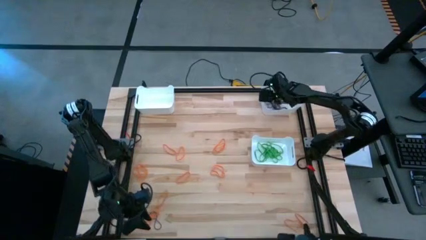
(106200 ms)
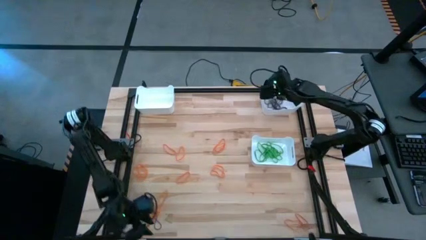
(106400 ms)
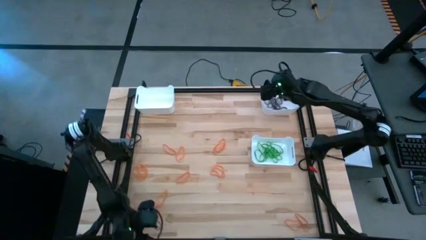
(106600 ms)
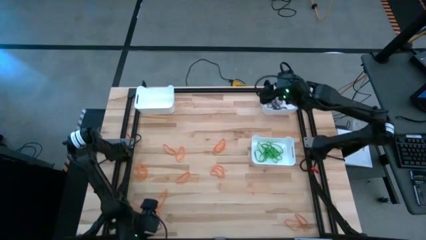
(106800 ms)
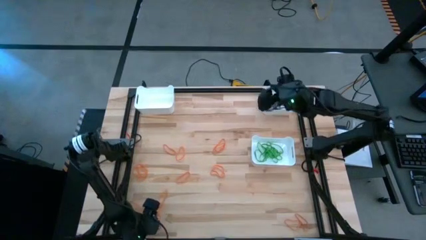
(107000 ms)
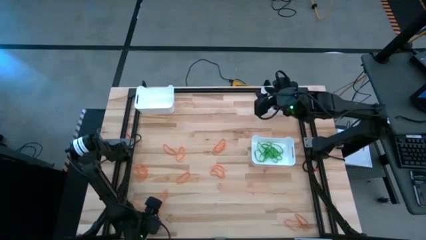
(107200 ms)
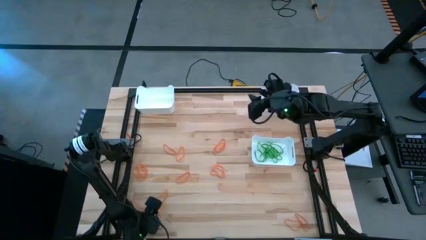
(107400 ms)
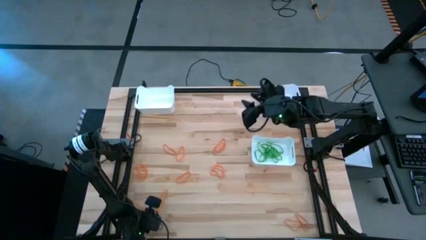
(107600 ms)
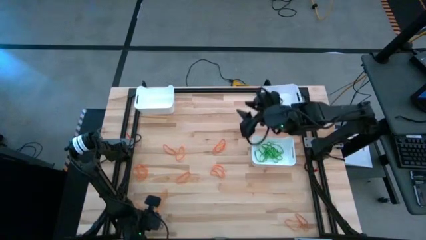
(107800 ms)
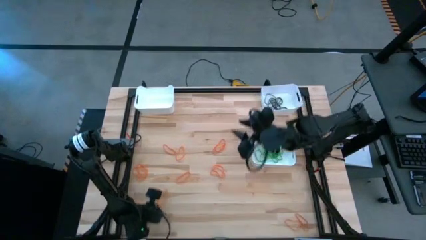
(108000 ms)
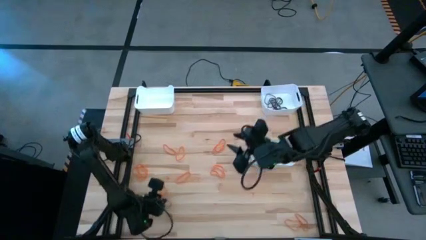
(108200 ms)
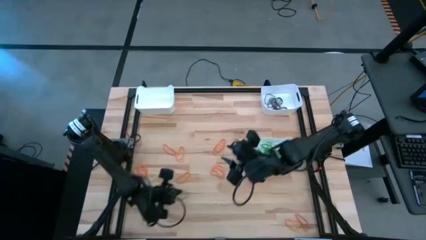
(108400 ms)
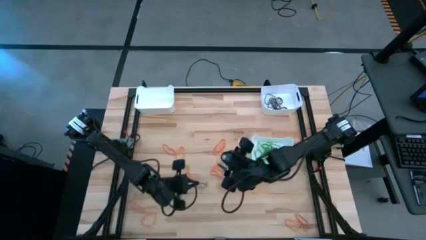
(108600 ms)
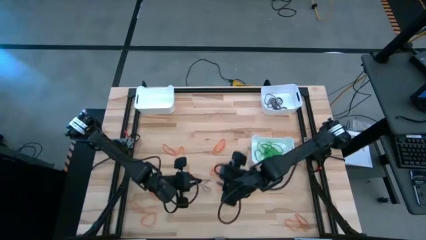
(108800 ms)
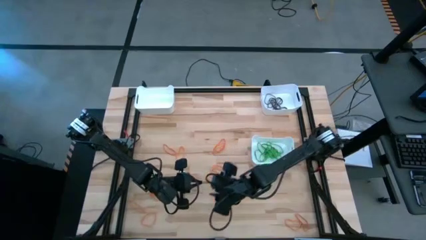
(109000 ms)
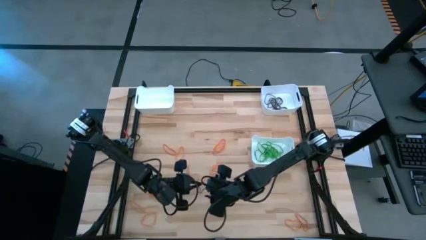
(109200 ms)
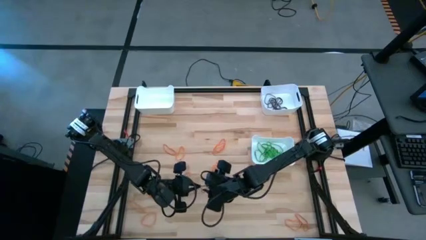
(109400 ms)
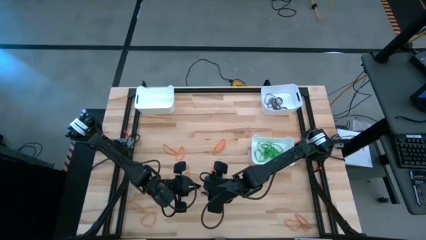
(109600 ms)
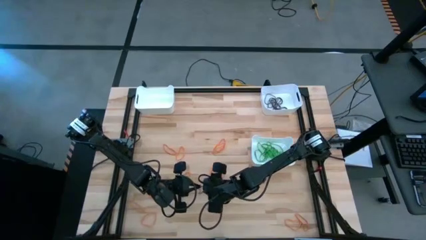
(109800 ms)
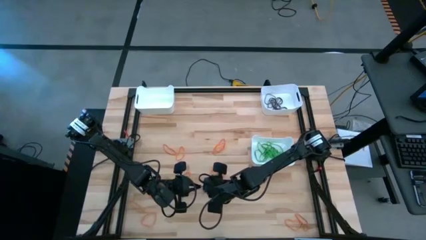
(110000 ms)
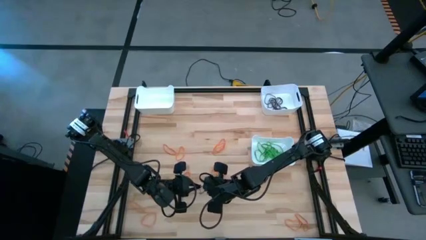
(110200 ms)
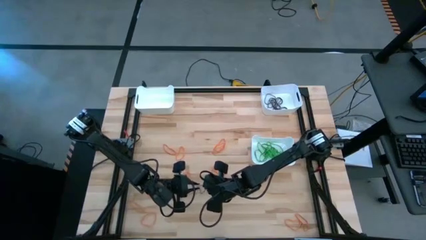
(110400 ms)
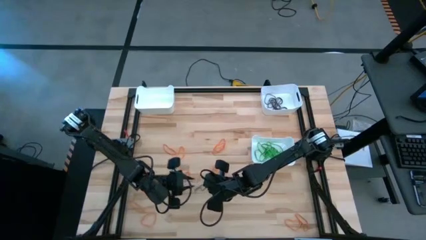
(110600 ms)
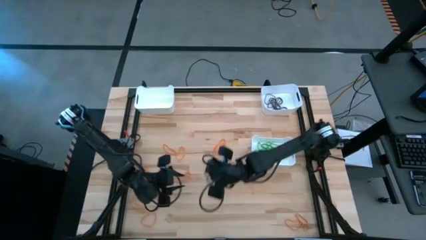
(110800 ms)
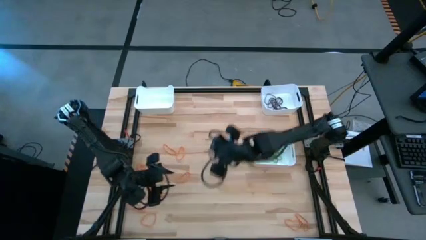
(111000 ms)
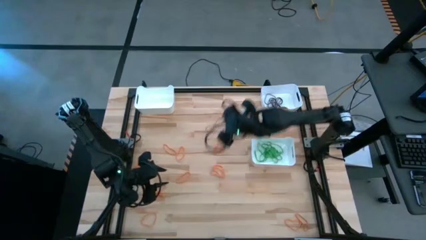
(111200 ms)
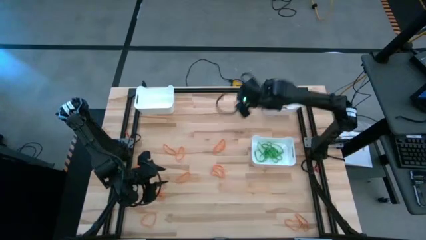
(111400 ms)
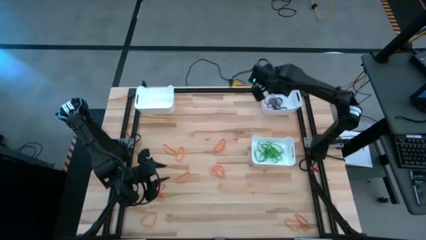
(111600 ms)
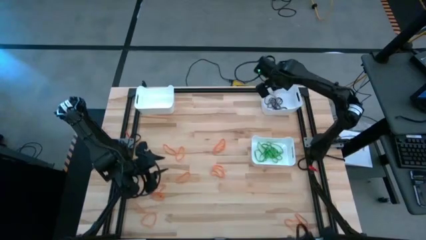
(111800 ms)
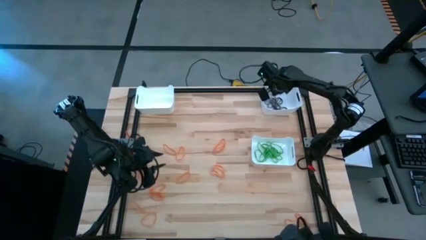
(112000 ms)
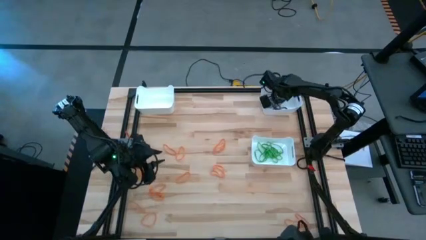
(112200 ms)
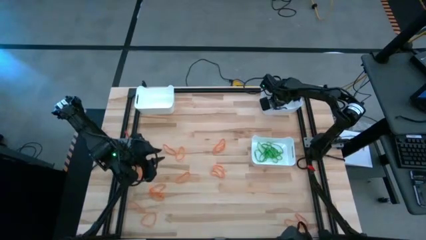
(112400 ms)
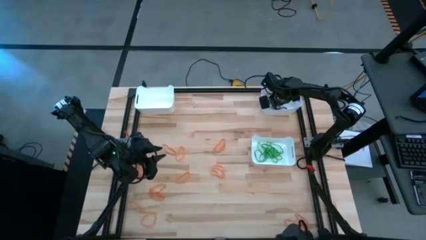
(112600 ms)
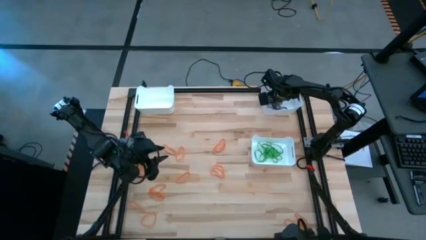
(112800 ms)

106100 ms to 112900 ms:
Task: Sort rubber bands into baskets
Put the black rubber band into the top right white bin

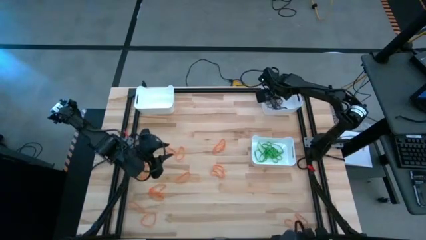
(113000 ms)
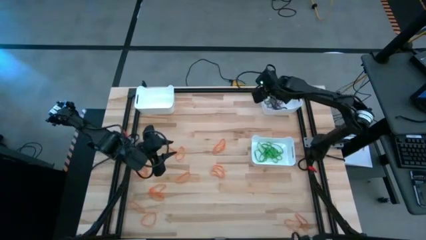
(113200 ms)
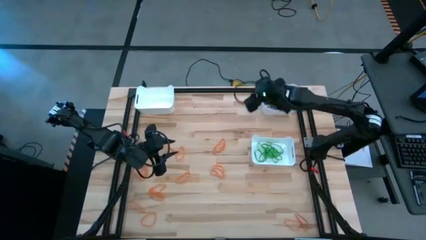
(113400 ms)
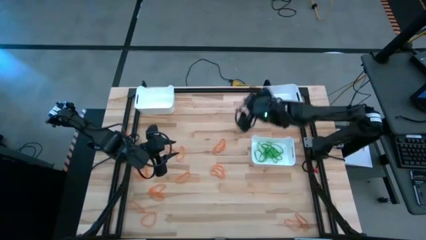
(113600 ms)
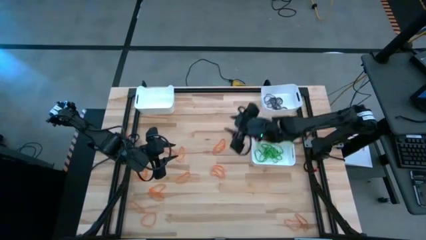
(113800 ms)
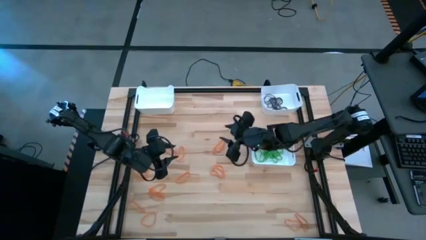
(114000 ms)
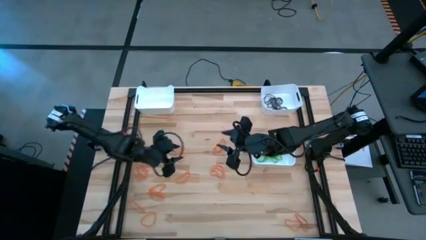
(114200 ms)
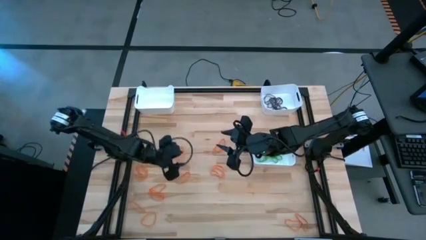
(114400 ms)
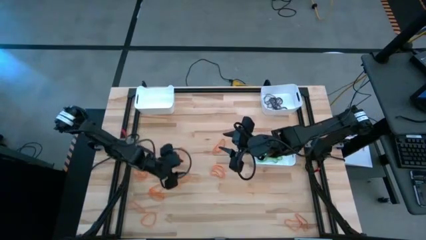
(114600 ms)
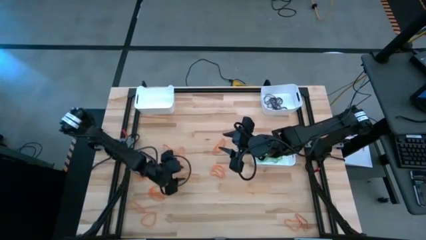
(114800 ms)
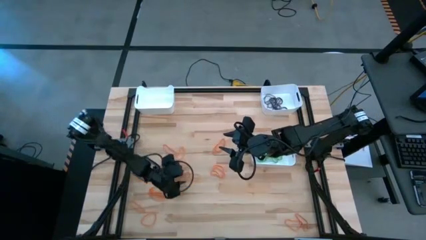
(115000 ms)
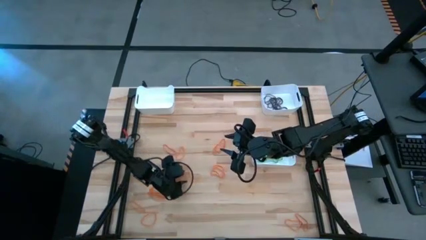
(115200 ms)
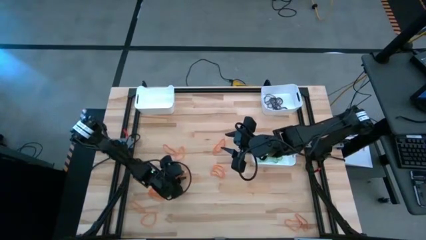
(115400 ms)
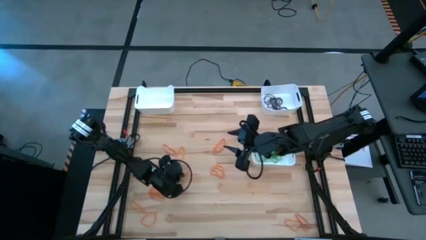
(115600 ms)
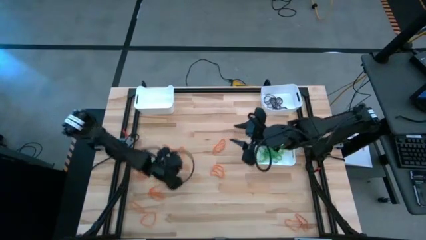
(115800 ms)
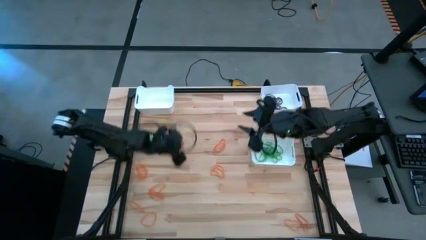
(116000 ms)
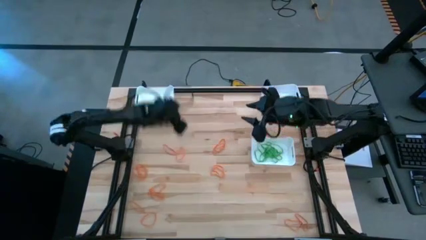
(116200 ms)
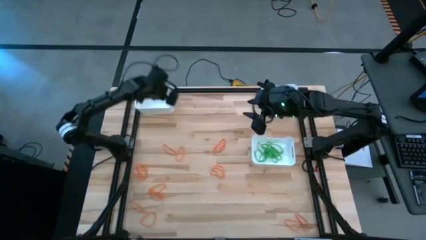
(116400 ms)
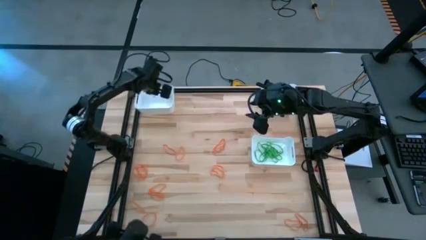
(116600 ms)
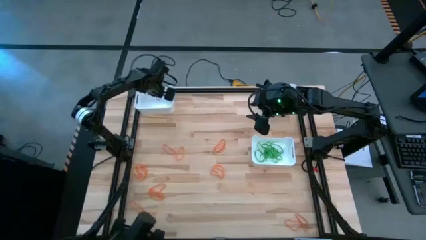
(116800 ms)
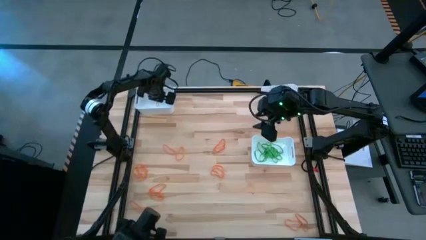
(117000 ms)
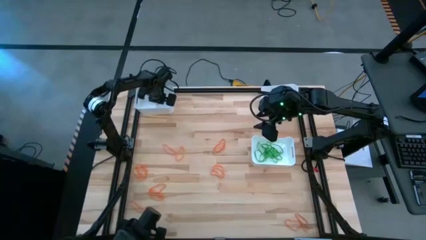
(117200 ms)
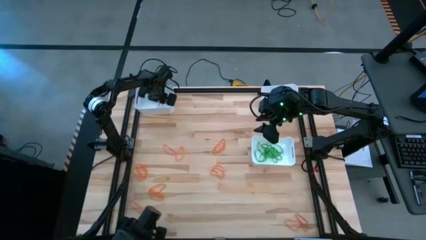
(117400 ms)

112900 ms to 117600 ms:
Put the orange rubber band into the top left white bin

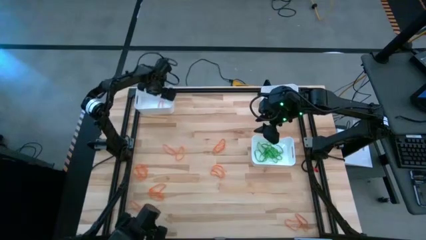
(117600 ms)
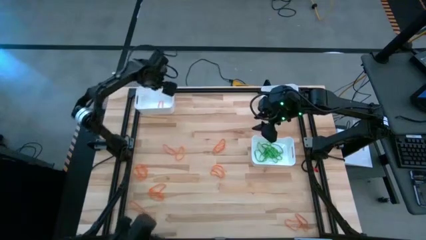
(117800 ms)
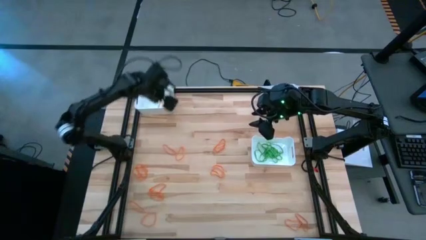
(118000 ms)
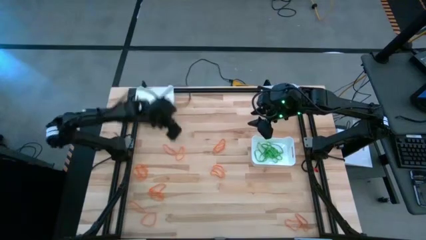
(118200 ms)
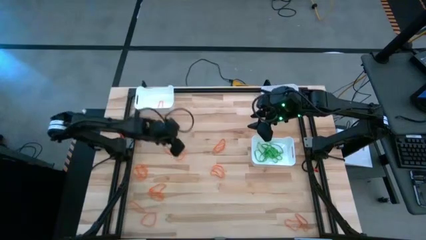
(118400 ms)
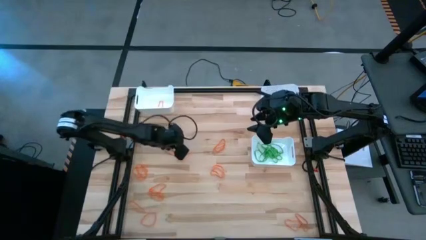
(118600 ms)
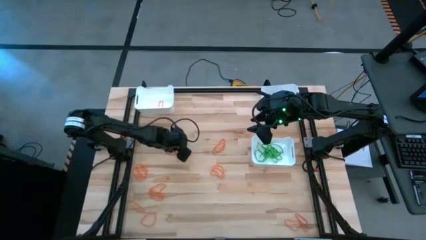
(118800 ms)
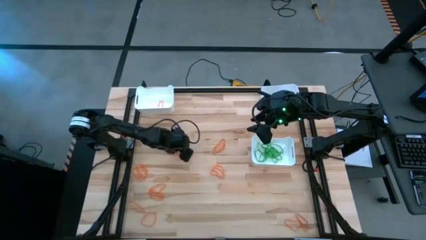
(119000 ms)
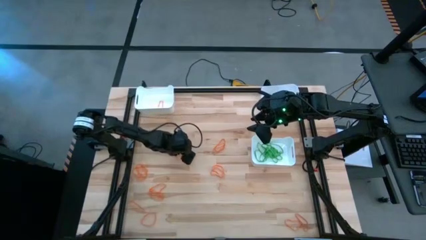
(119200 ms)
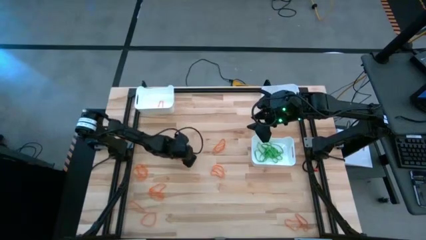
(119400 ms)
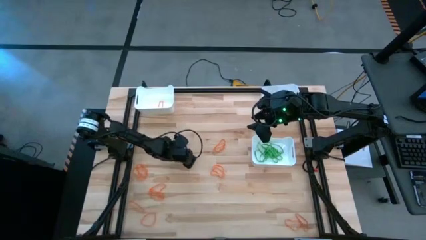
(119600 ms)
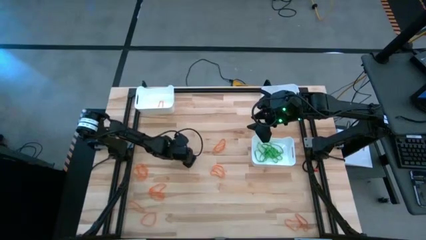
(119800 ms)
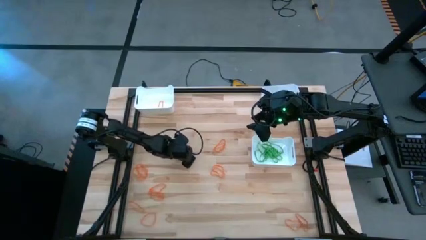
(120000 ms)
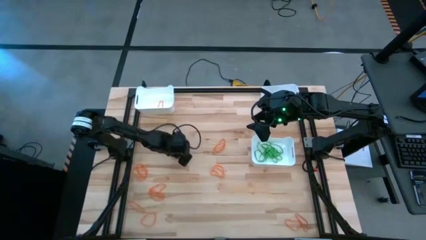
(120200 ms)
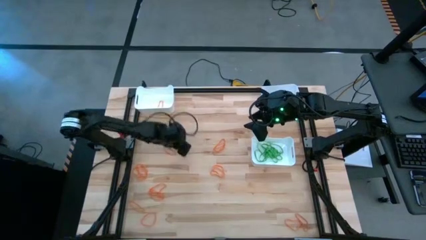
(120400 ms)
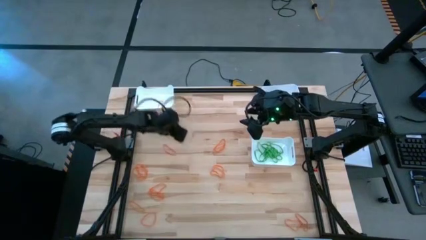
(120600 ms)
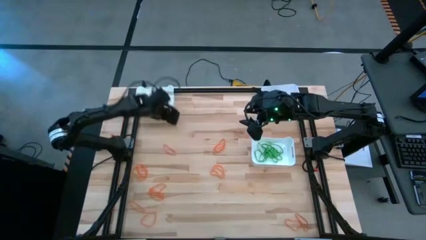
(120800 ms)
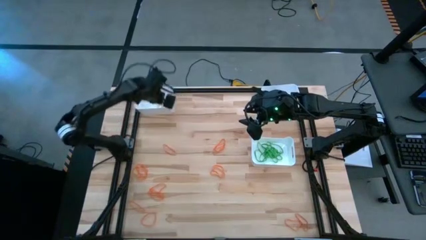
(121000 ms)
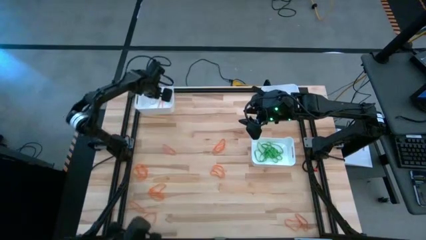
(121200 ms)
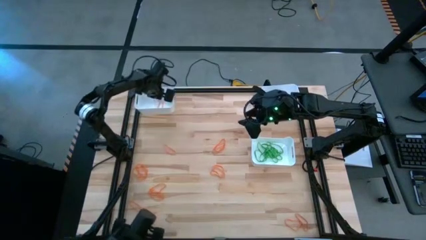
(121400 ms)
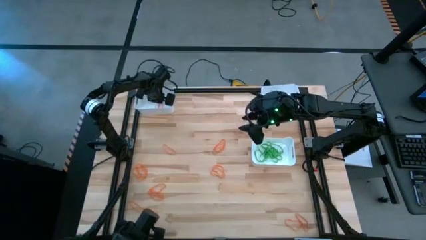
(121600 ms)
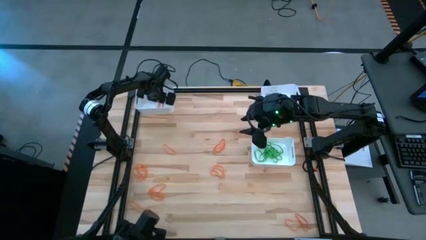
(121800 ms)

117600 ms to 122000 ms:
Put the orange rubber band into the top left white bin

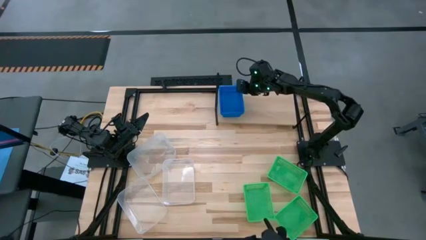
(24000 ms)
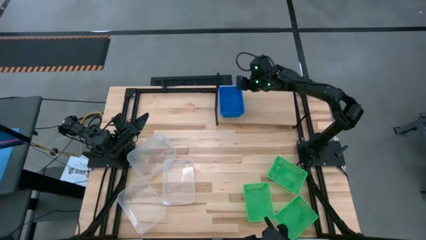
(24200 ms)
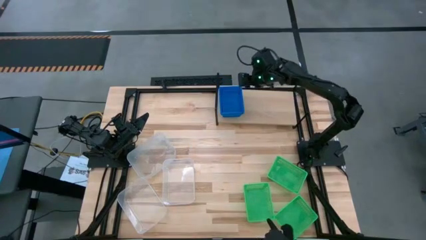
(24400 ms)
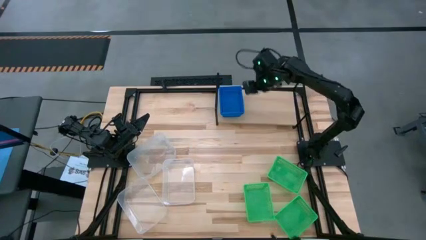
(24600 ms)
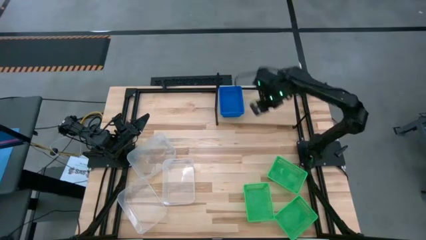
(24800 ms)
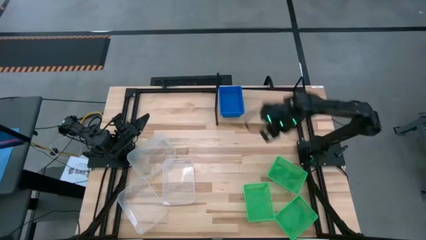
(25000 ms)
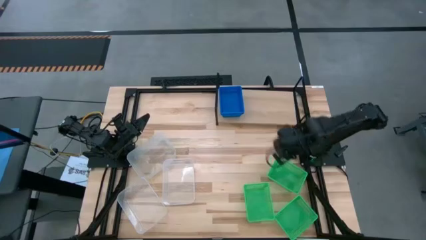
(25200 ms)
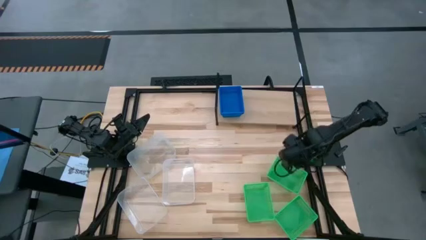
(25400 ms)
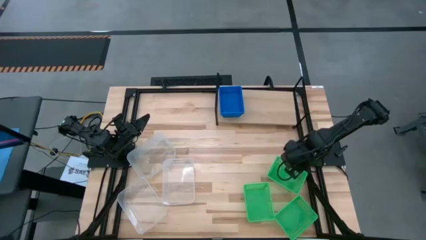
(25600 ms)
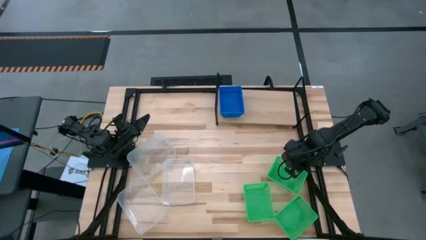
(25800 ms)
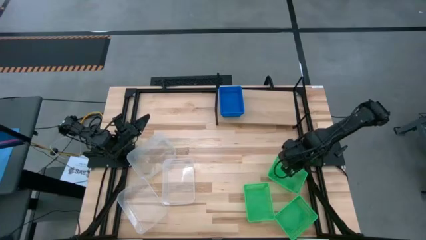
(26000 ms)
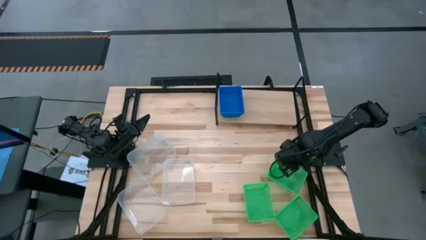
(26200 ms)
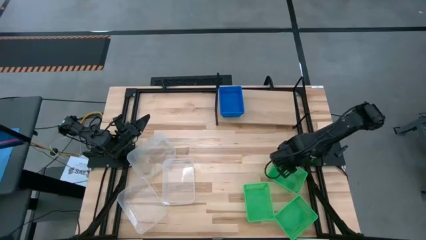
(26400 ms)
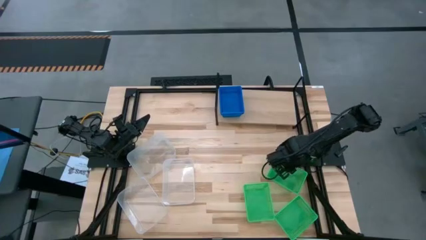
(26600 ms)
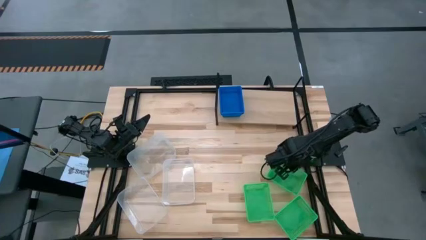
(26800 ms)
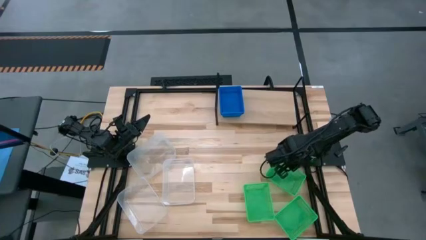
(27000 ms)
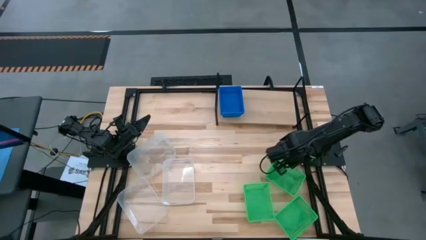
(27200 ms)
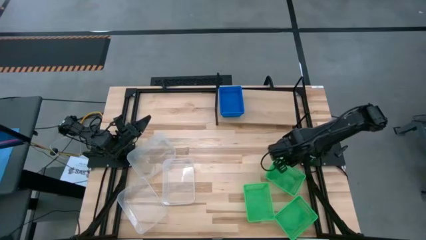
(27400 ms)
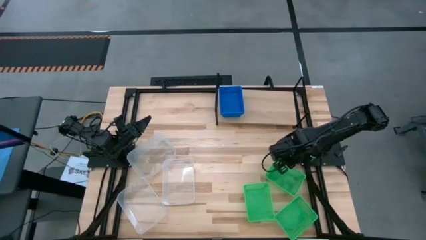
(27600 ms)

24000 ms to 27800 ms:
Task: Stack baskets on shelf by color
Put the top right green bin on the shelf
